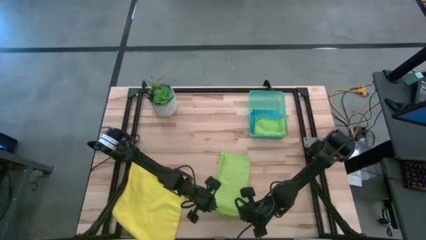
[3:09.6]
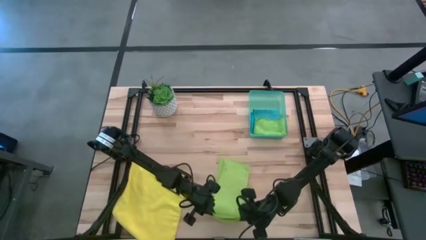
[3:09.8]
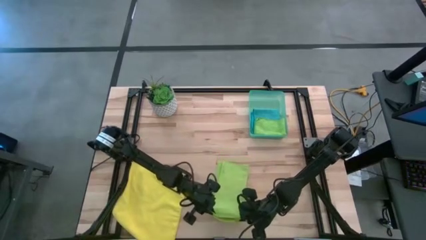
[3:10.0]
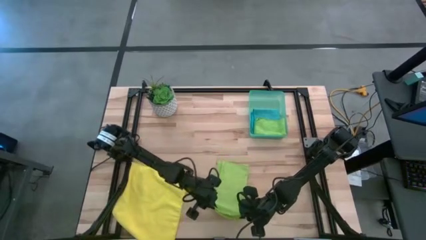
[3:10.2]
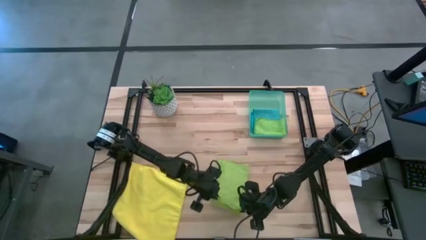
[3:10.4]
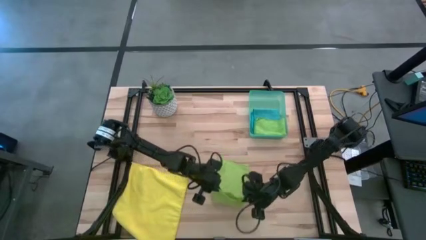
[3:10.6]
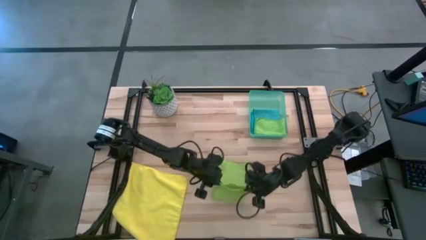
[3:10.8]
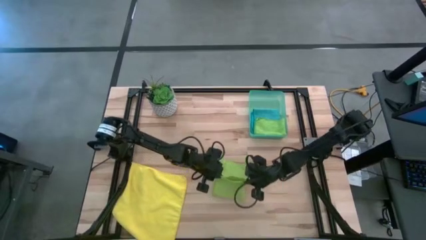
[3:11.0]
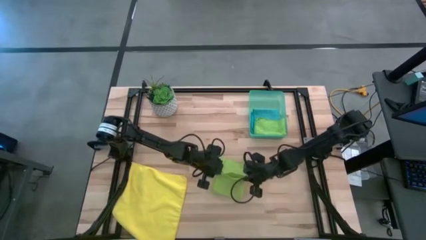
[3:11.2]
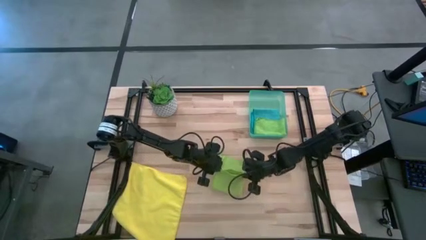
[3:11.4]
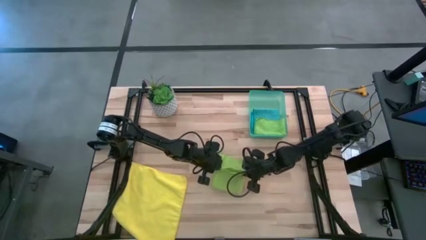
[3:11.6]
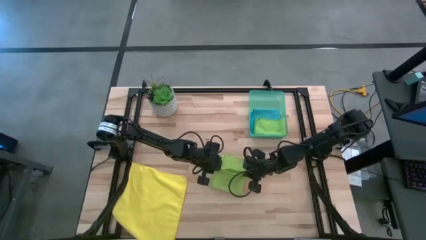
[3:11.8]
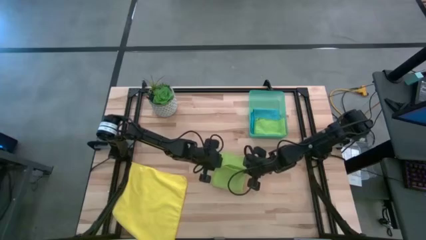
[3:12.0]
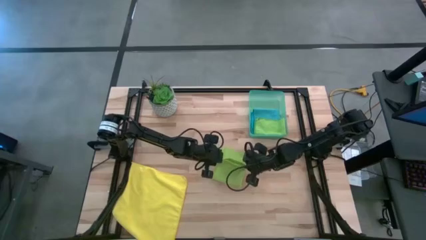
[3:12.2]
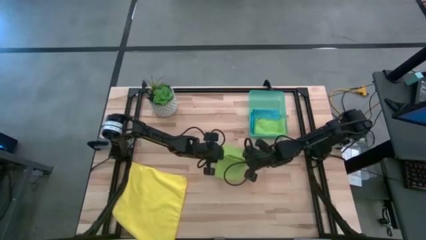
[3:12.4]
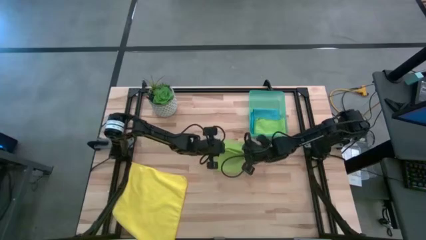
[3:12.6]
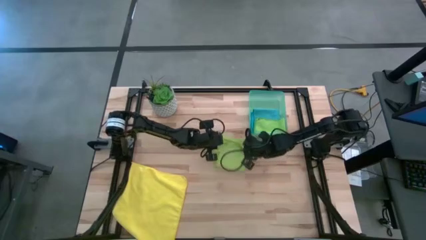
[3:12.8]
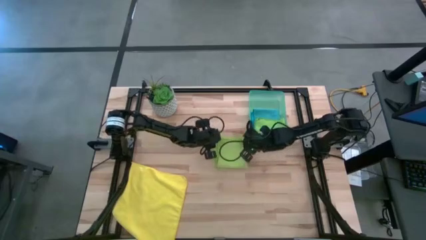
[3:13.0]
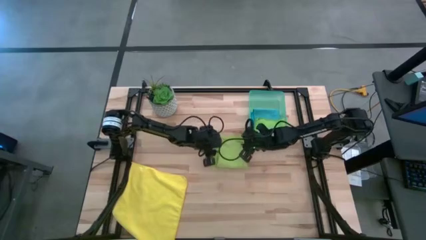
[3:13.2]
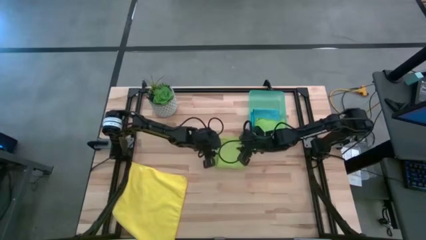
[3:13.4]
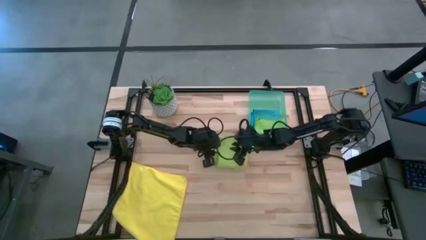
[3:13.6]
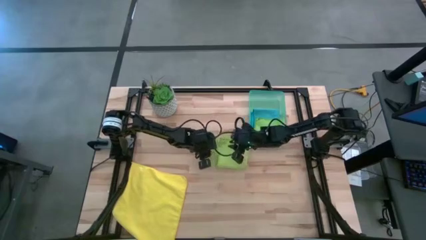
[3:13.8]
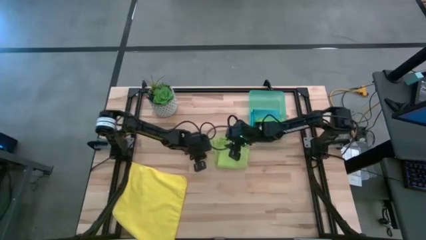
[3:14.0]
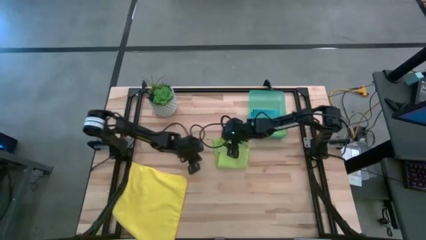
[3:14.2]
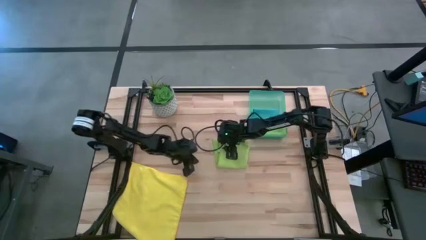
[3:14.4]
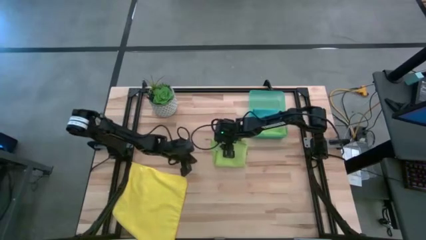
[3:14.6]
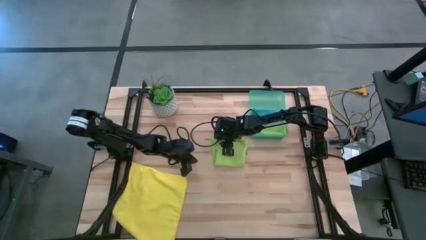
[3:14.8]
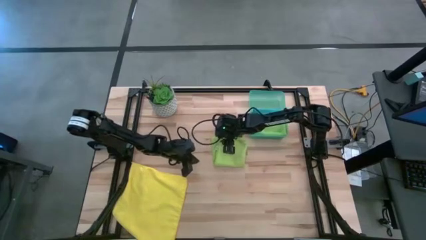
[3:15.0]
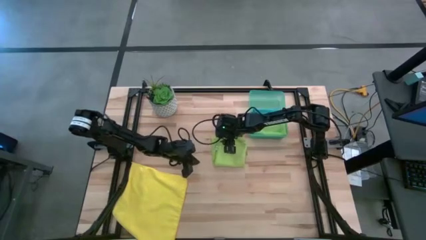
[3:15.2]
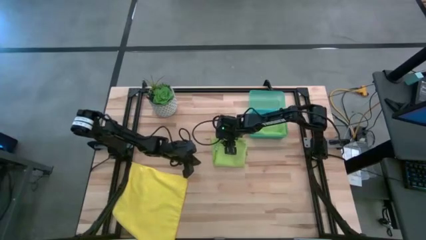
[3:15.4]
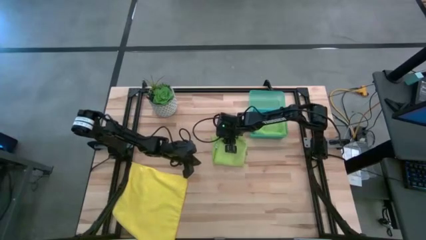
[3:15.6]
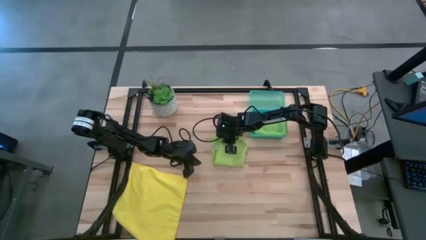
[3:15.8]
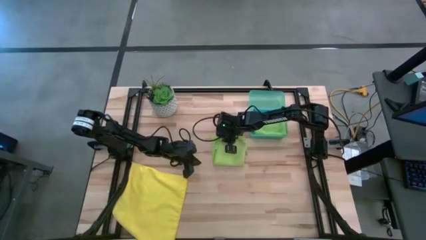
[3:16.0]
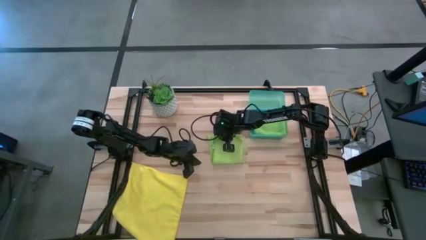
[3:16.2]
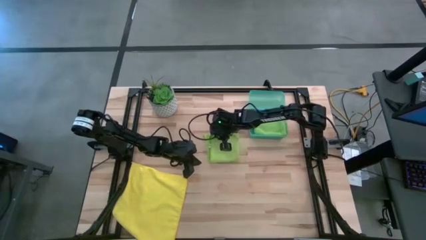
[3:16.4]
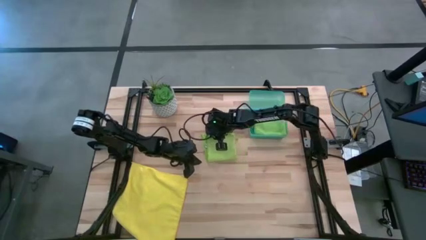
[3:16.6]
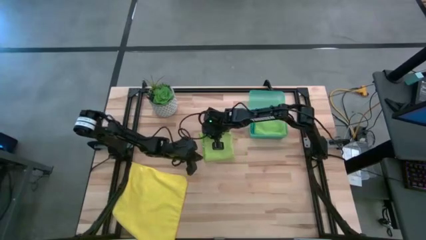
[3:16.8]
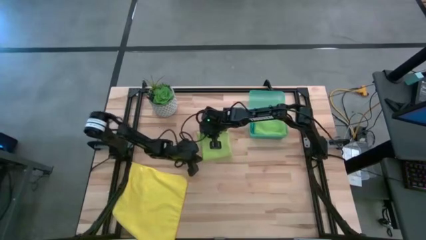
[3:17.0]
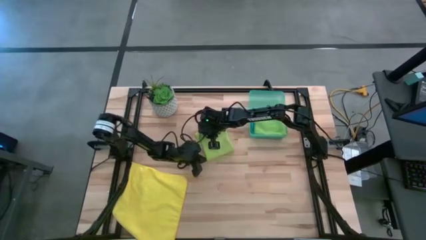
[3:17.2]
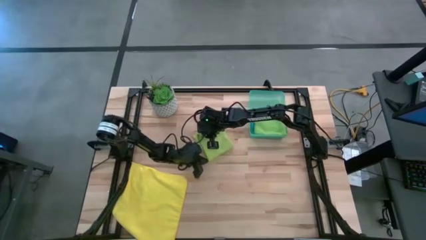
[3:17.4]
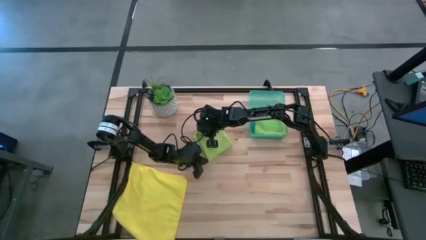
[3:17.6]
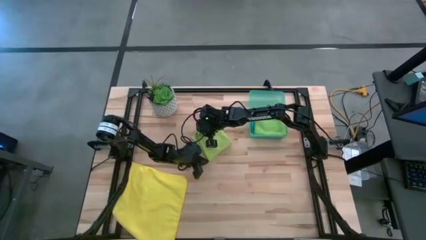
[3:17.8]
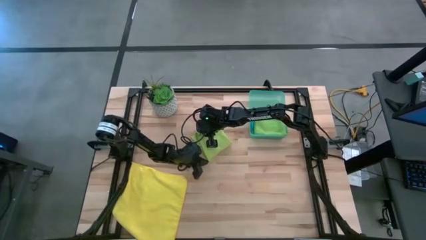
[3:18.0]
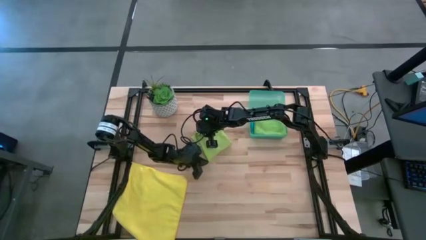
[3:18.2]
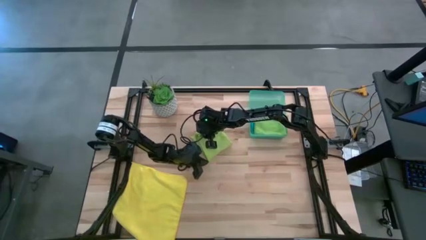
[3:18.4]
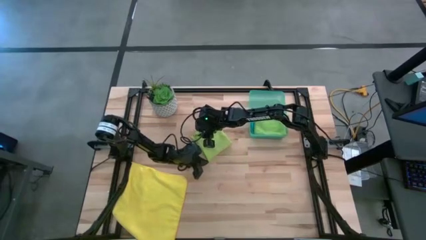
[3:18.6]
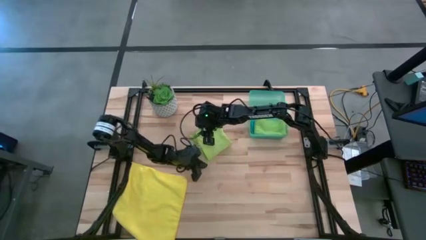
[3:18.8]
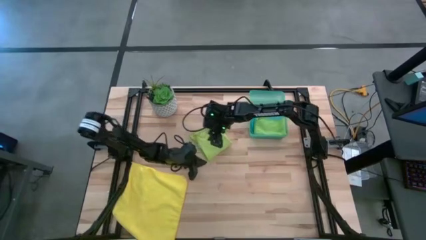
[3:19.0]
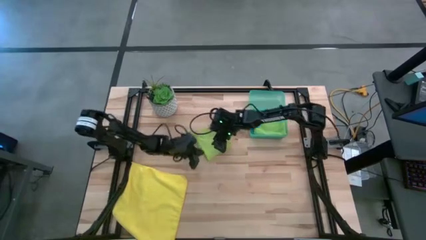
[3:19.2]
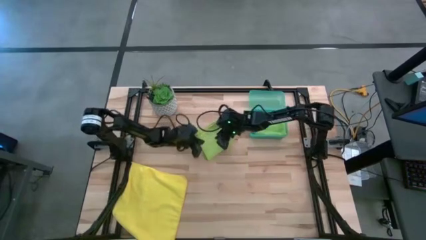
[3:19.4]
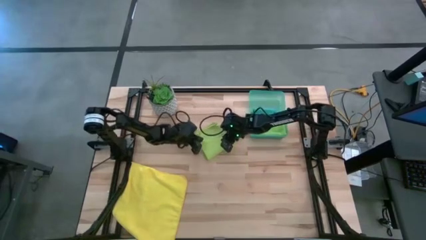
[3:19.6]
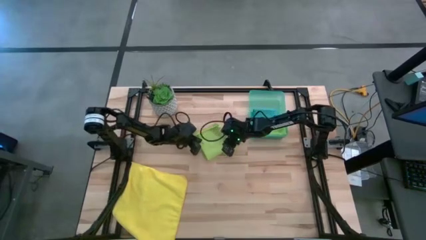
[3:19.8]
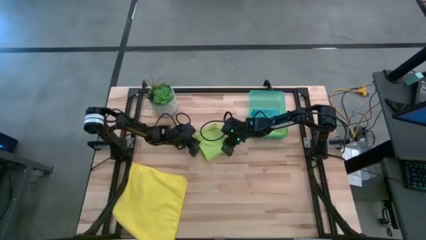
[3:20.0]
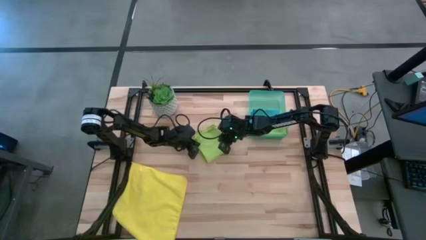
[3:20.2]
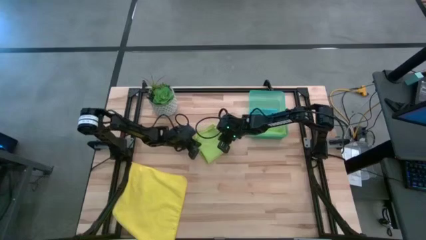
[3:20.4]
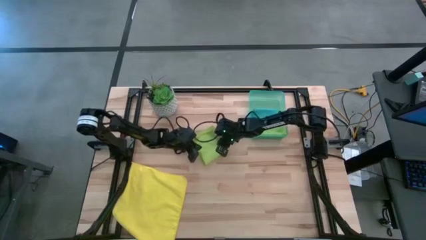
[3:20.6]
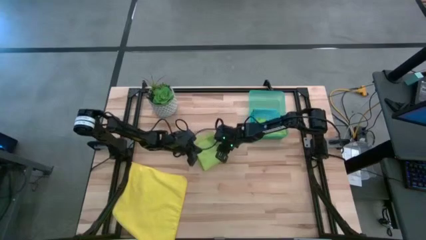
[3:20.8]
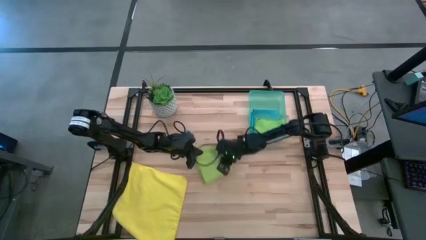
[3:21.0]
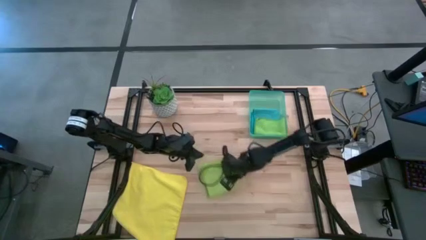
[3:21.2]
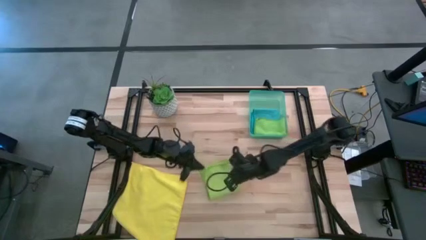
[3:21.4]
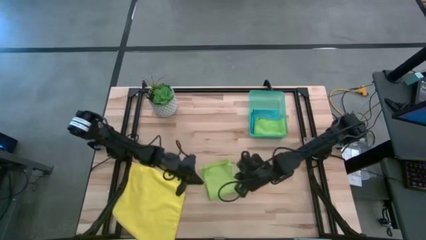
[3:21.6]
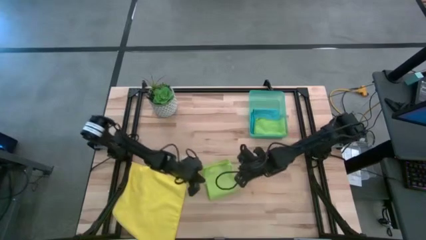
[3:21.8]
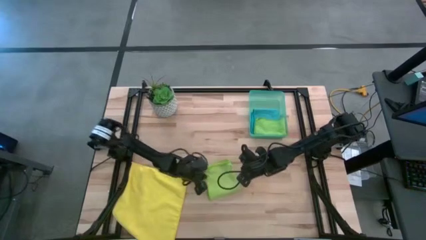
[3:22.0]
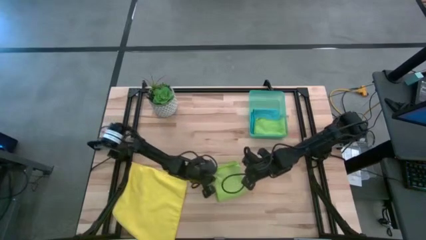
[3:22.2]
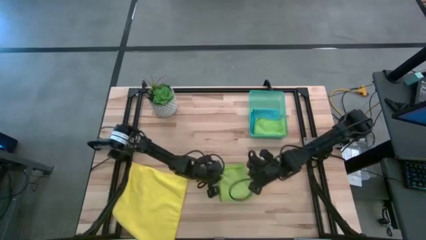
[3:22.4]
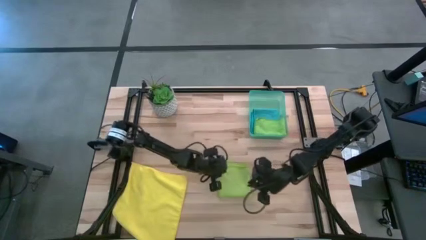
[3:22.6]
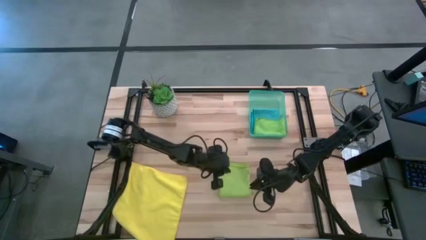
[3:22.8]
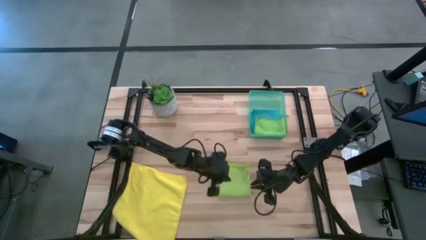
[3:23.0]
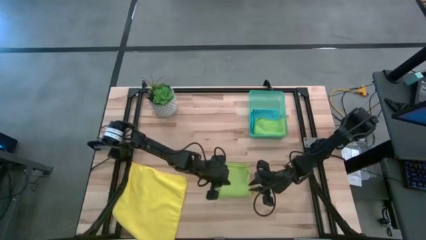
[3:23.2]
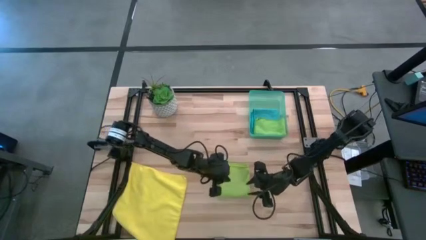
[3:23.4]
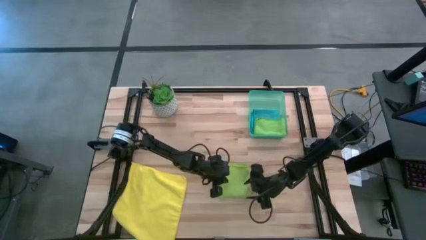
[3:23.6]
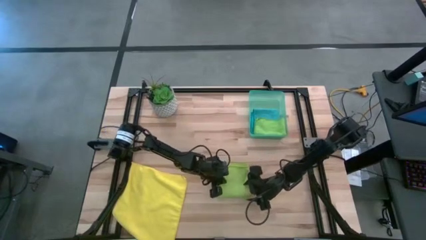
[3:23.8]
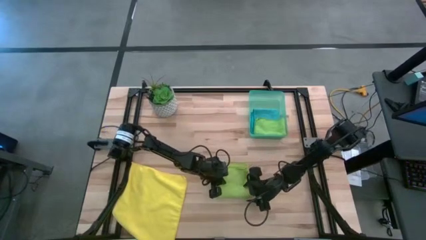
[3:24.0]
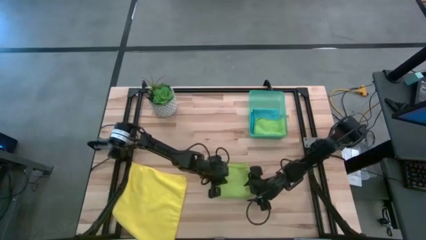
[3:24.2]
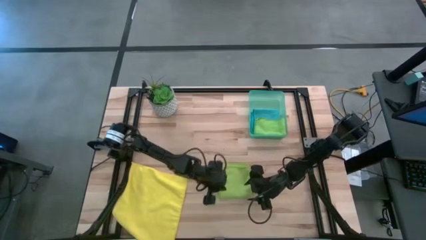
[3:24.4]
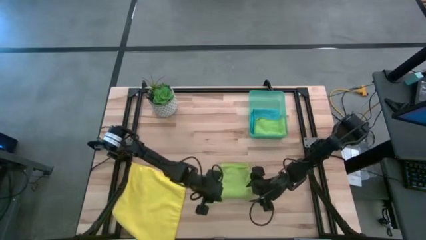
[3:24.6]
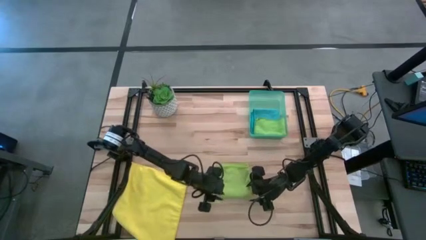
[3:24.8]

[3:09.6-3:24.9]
Task: Fold microfiber towels
Fold the light green towel
